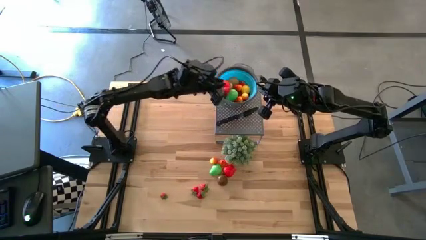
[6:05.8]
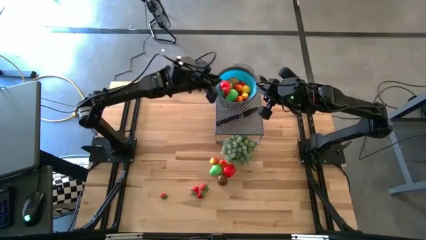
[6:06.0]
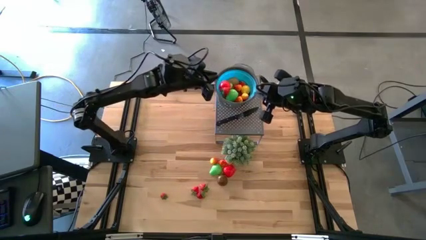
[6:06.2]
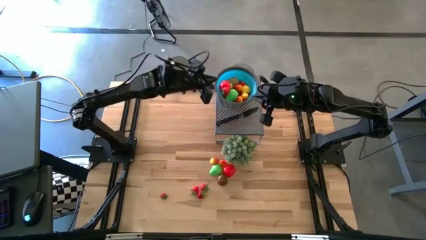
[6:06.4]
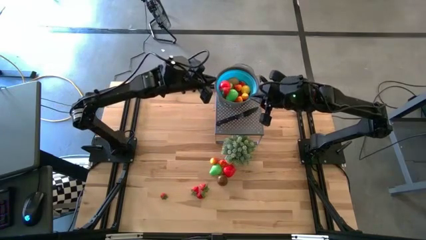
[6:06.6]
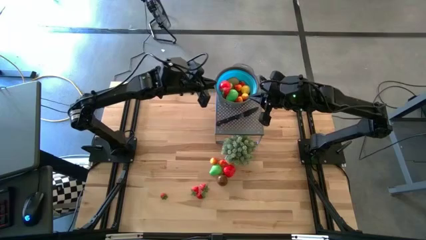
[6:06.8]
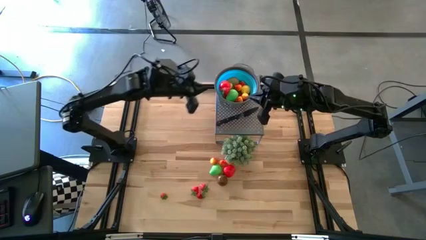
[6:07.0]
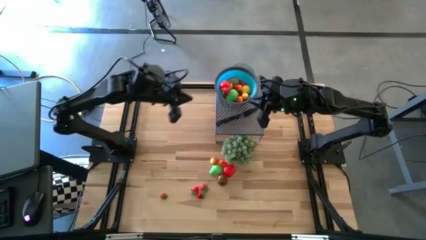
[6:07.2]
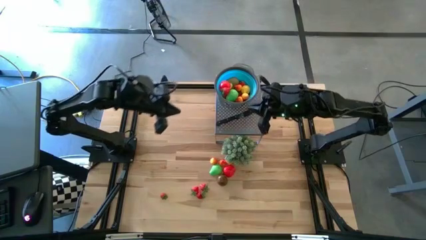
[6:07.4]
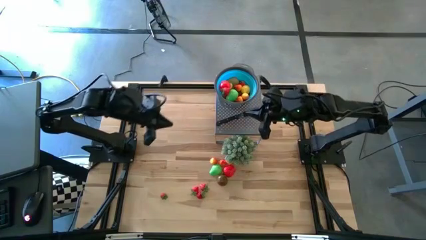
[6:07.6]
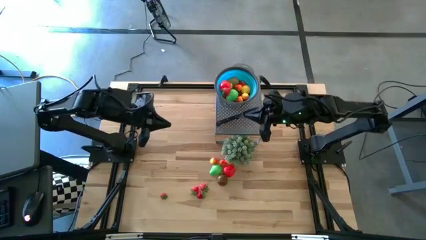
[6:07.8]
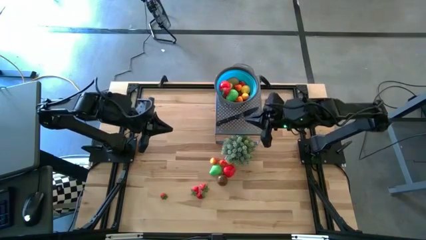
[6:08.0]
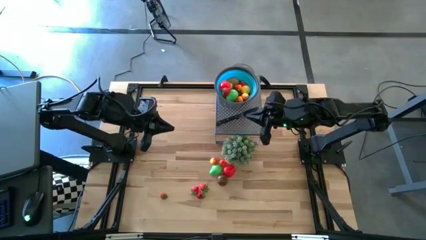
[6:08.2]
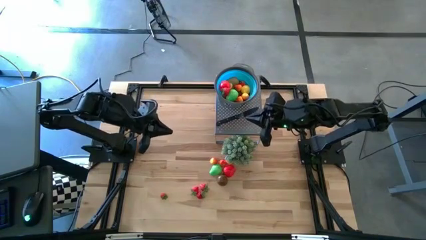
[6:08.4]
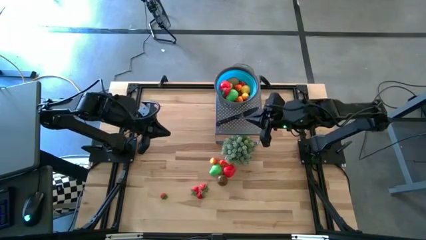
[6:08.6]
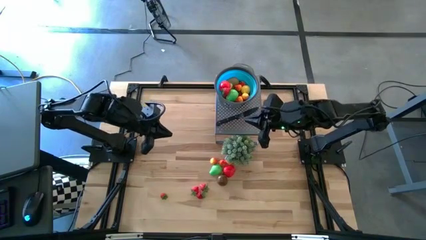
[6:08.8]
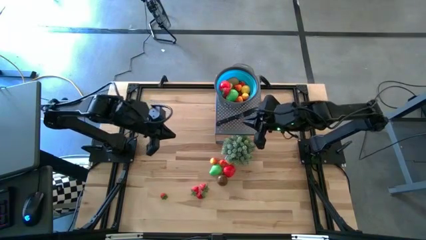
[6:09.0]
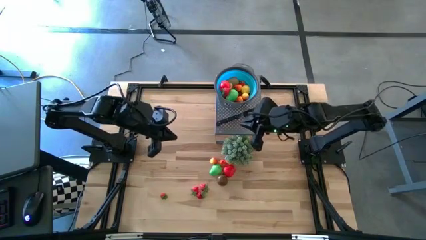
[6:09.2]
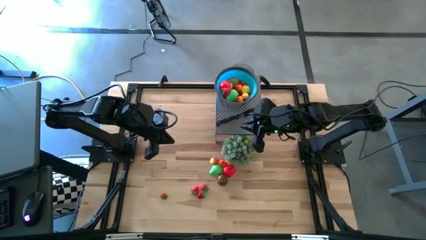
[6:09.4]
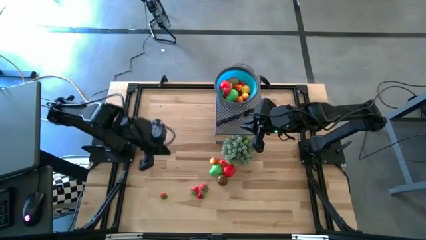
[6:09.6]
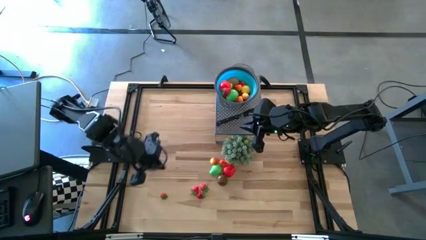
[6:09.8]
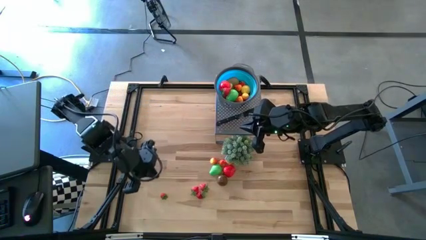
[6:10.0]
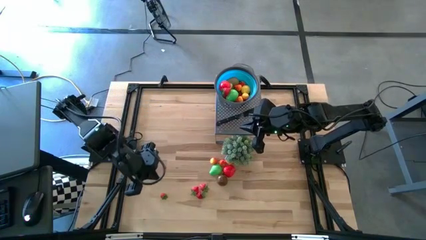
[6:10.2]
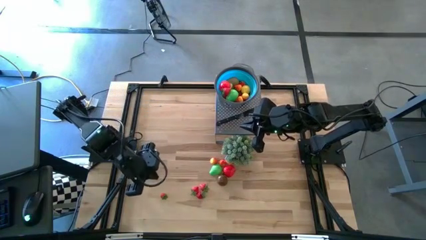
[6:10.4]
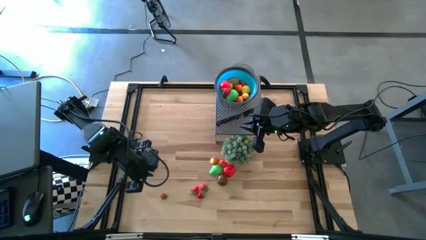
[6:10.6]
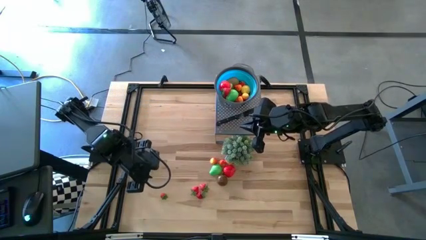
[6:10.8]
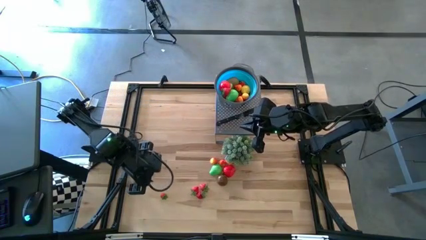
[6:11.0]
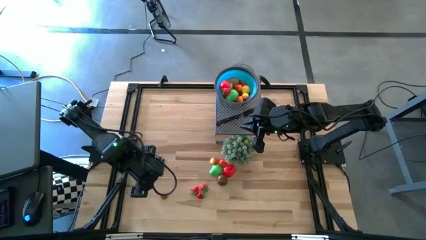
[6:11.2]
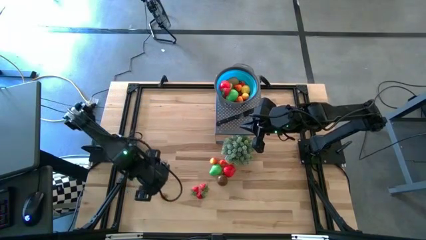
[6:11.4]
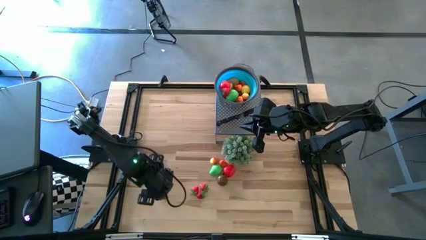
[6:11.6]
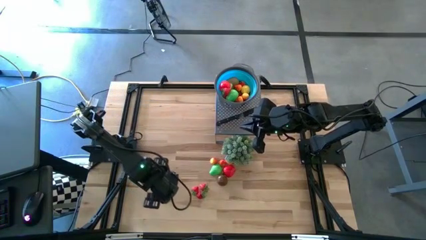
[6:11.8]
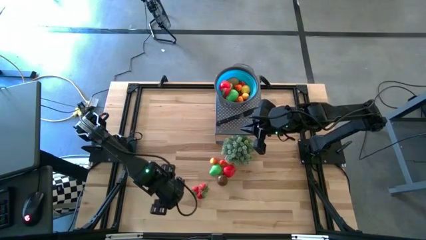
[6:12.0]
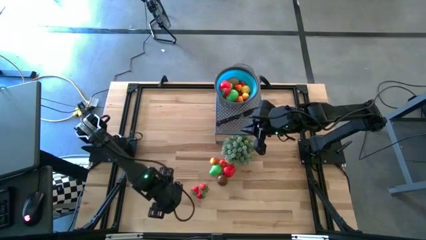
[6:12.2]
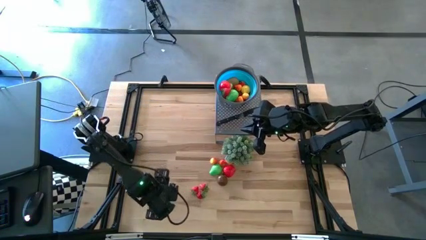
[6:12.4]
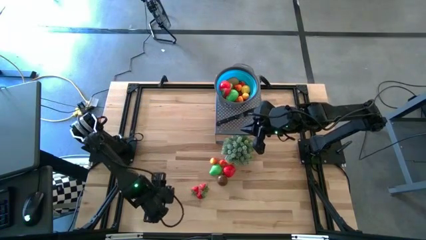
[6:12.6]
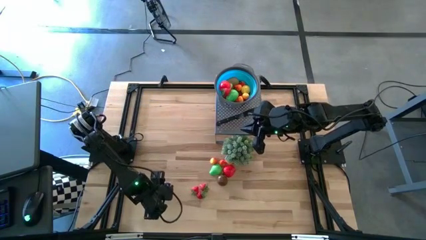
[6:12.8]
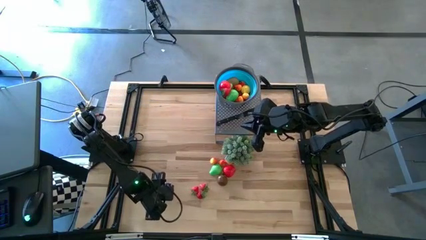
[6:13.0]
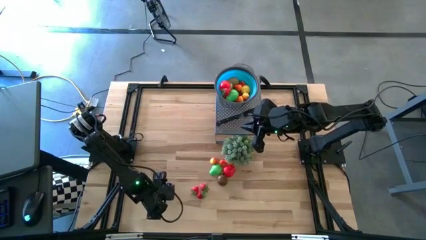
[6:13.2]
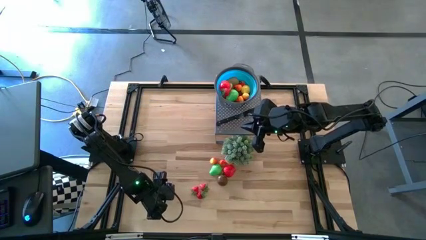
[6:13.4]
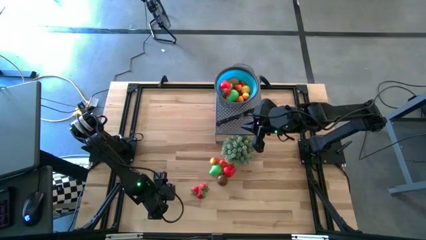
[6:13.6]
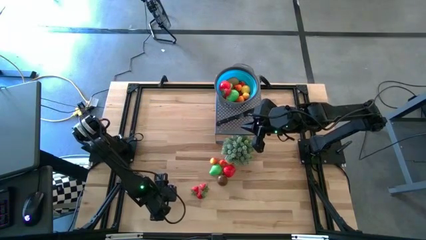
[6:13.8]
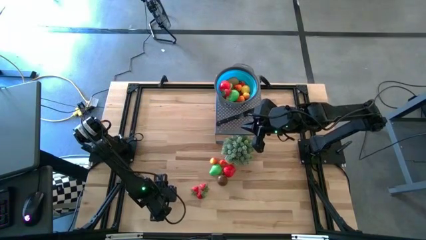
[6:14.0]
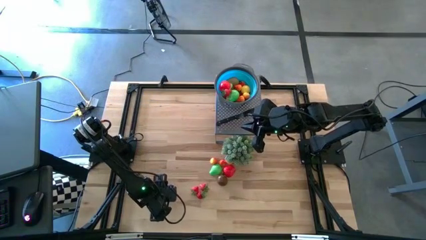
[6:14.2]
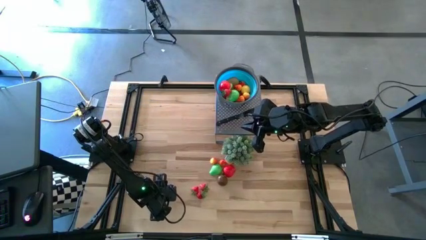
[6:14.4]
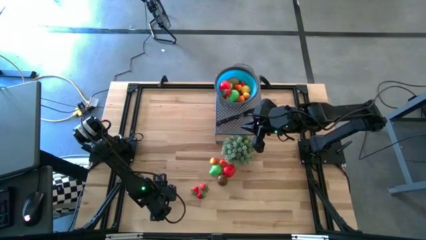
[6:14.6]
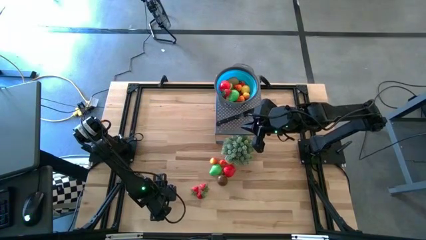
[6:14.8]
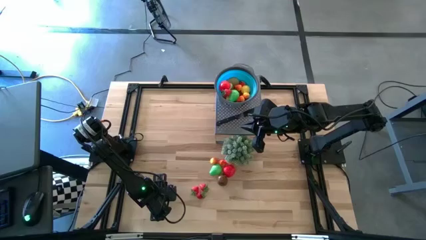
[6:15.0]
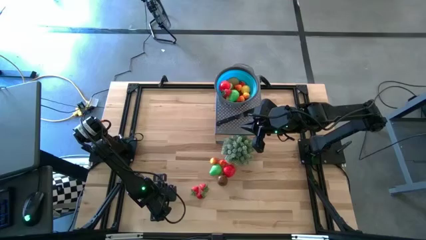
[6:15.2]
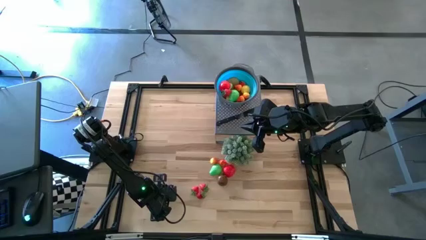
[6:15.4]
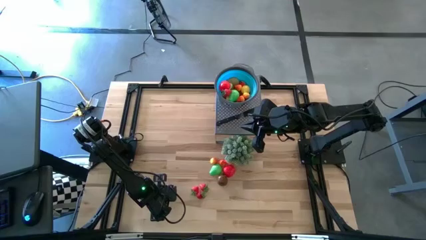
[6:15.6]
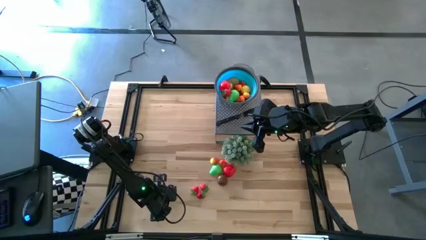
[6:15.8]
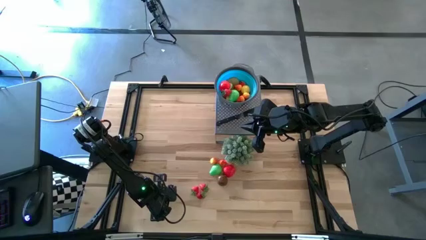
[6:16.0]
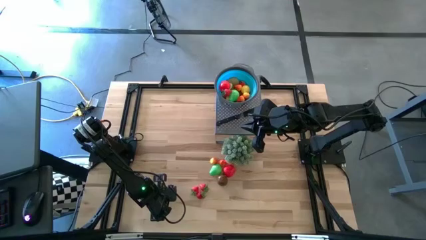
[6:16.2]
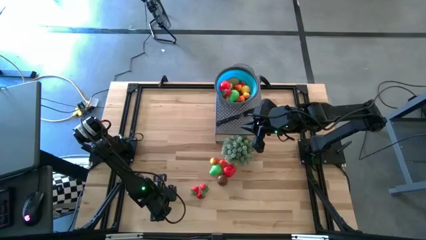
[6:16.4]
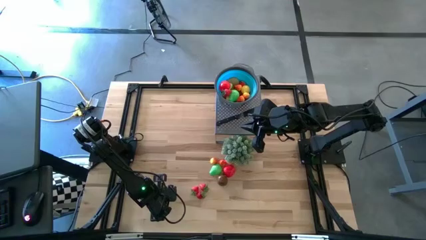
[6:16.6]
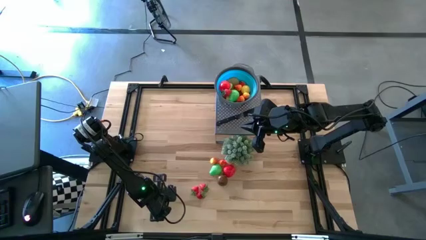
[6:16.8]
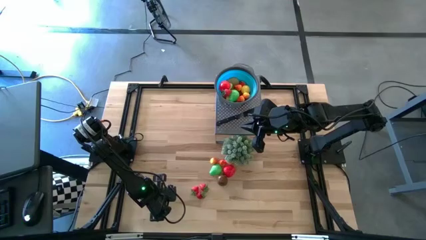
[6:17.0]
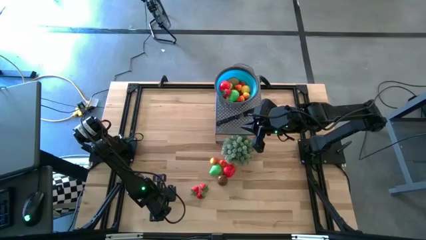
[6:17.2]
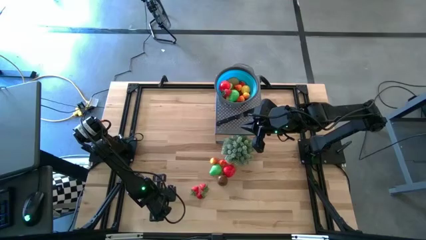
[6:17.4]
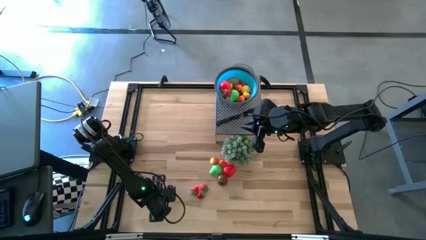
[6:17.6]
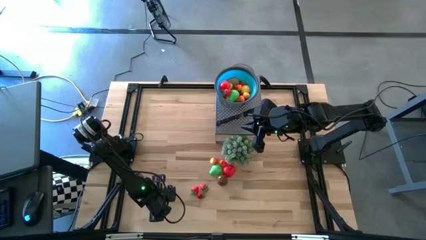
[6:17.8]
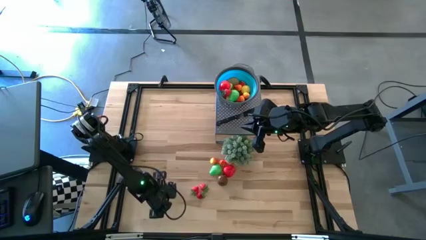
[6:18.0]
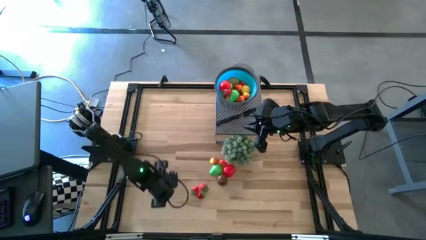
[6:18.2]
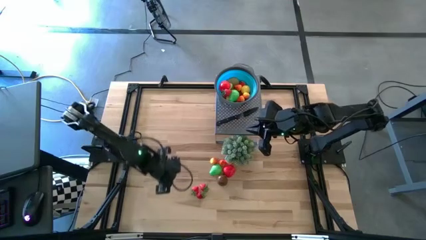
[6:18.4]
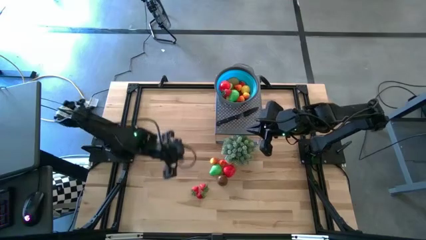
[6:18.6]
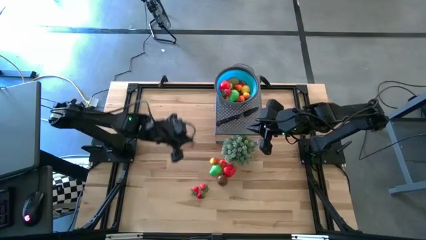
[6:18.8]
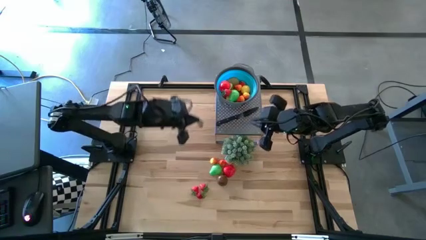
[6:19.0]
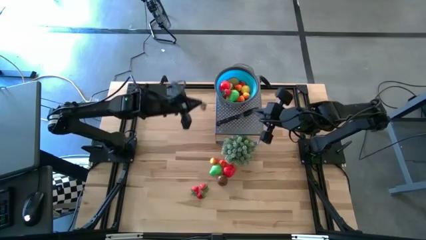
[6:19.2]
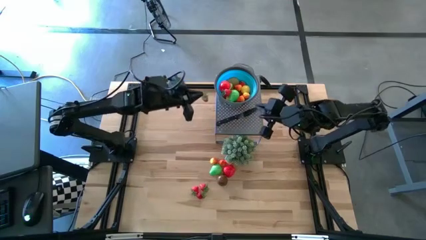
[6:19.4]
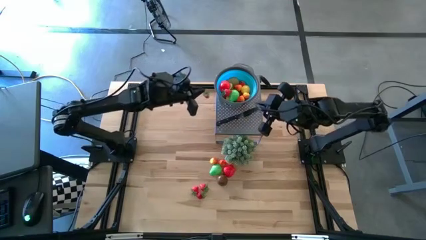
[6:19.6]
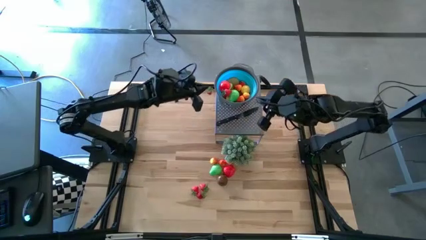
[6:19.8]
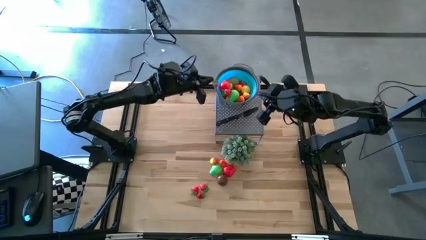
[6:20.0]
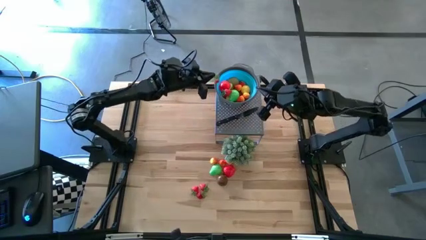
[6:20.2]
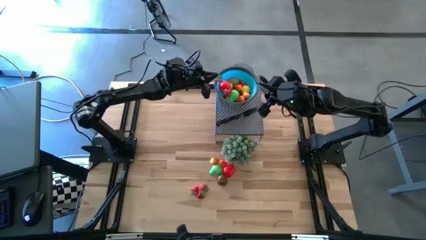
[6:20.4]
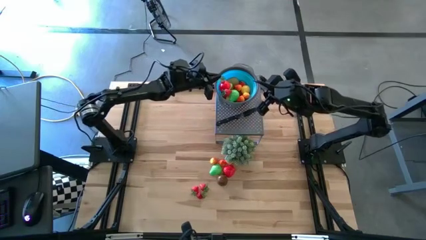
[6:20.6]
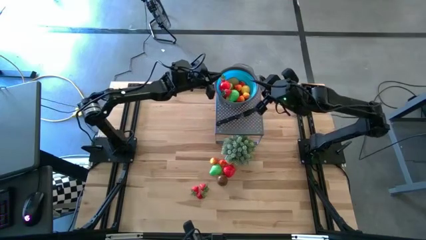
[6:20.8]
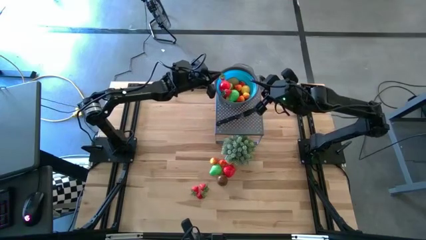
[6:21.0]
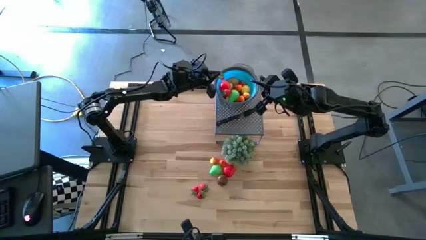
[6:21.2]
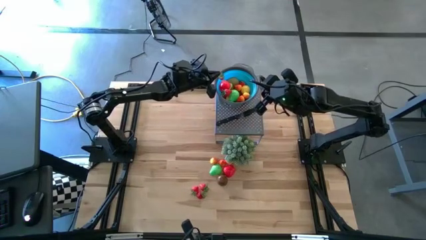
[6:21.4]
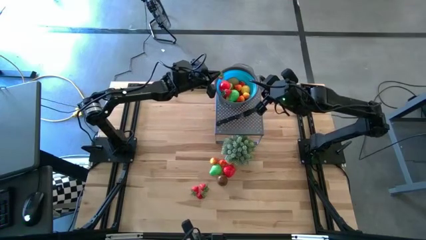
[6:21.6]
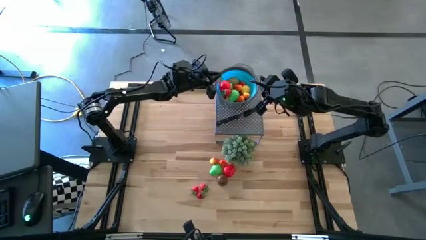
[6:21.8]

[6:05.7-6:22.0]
Task: Pick & Place Fruit
Put the red strawberry into the blue strainer bowl

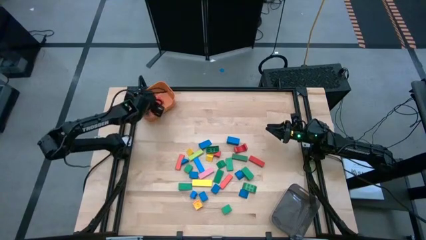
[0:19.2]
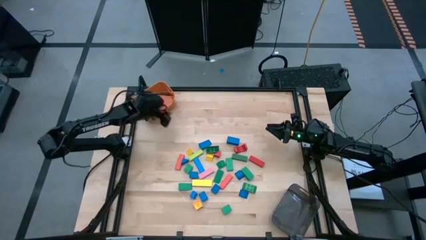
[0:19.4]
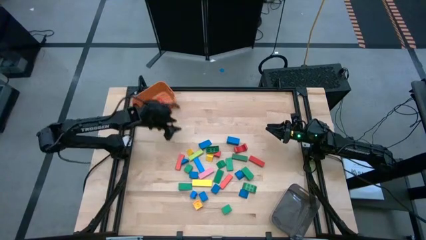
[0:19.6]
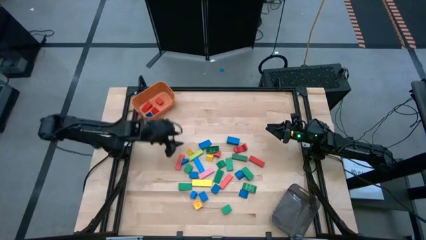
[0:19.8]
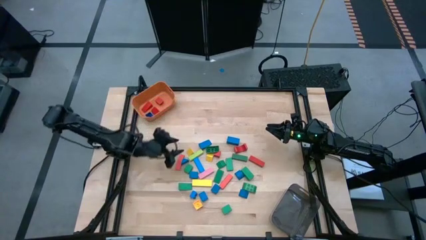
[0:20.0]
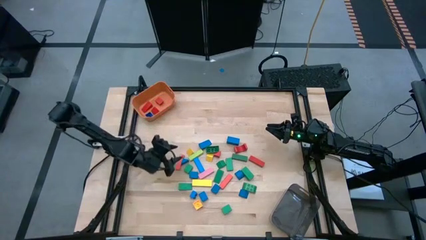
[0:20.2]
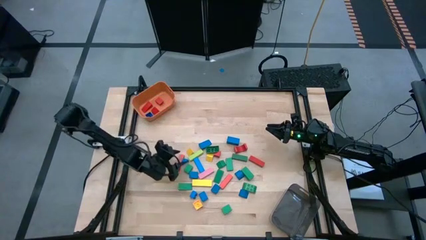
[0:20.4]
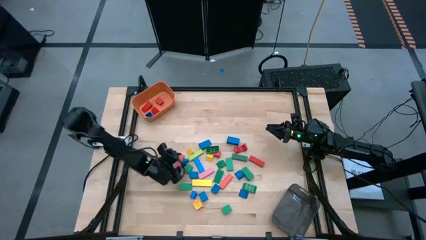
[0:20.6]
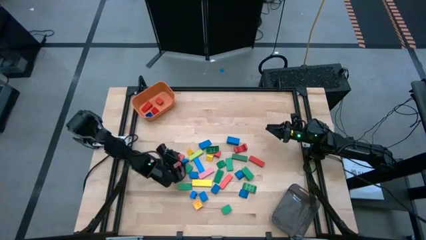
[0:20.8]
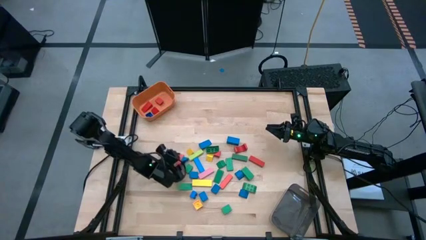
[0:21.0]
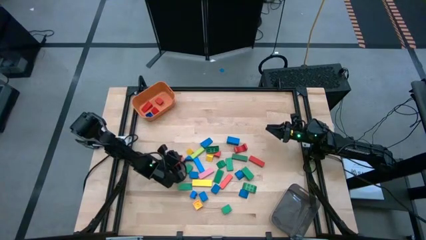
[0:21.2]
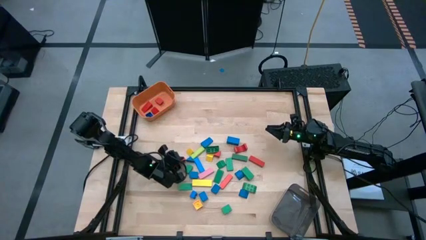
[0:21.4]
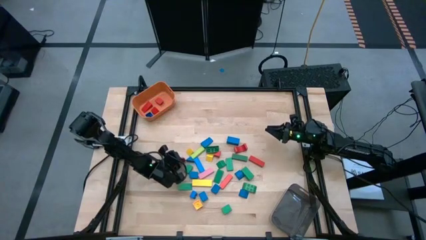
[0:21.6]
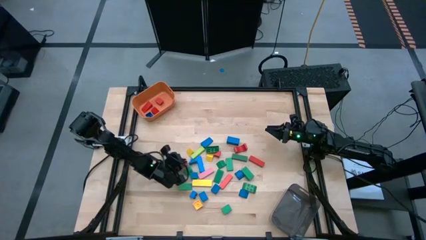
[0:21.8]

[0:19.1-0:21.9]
Task: Sort blocks by size
Put the small blue block into the orange bin
